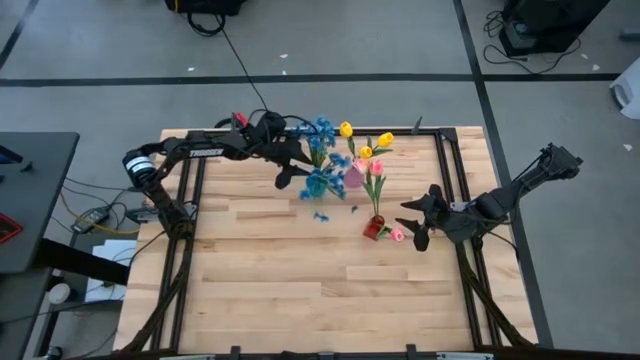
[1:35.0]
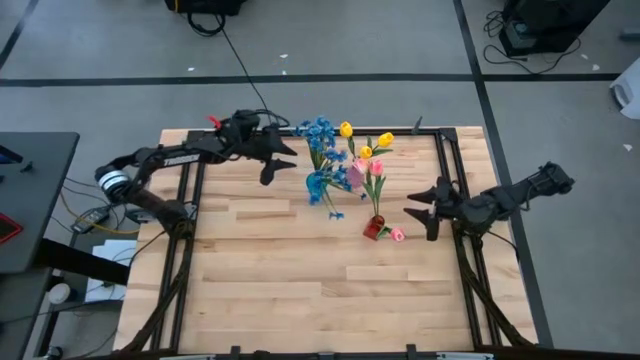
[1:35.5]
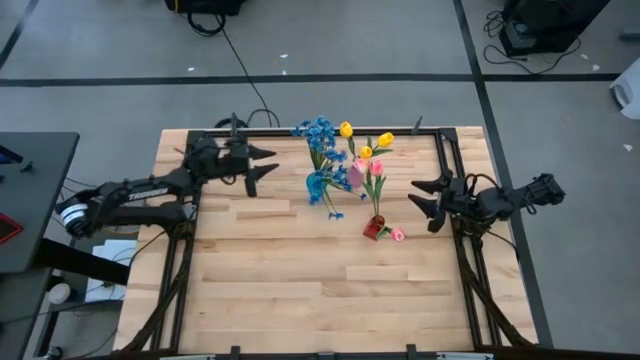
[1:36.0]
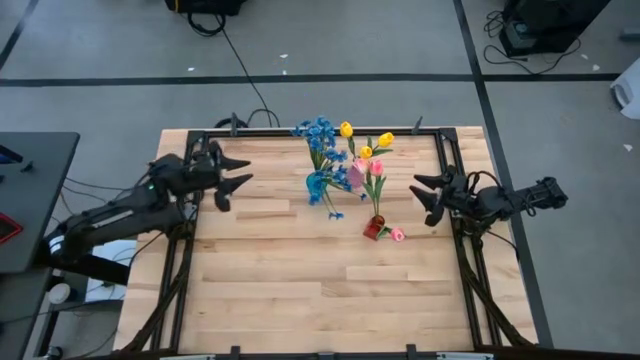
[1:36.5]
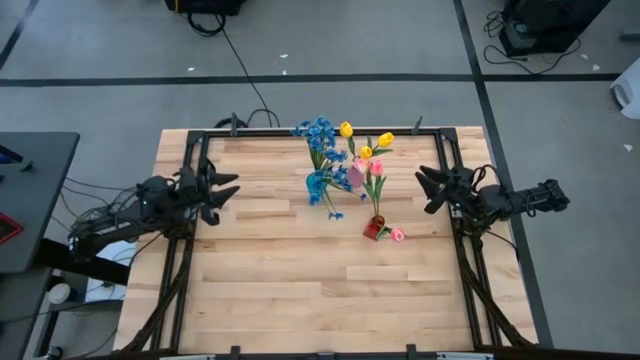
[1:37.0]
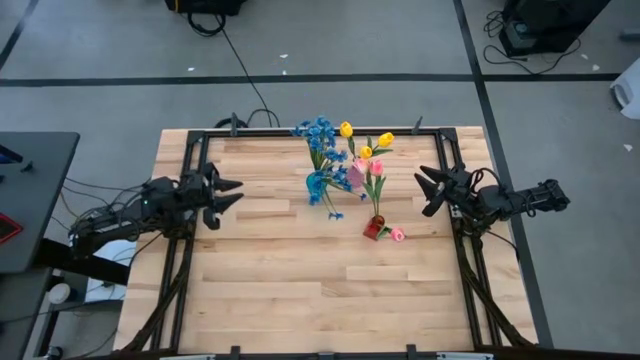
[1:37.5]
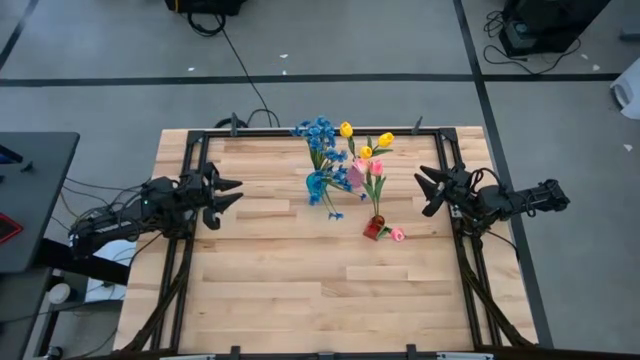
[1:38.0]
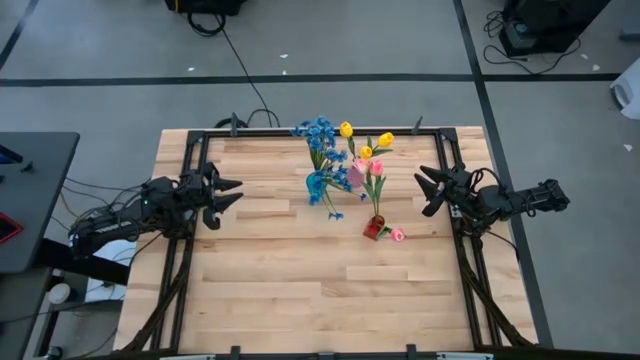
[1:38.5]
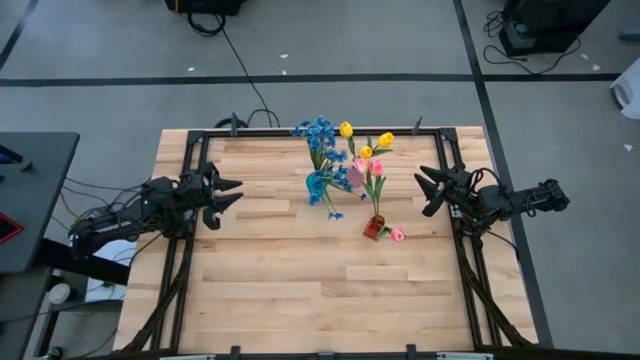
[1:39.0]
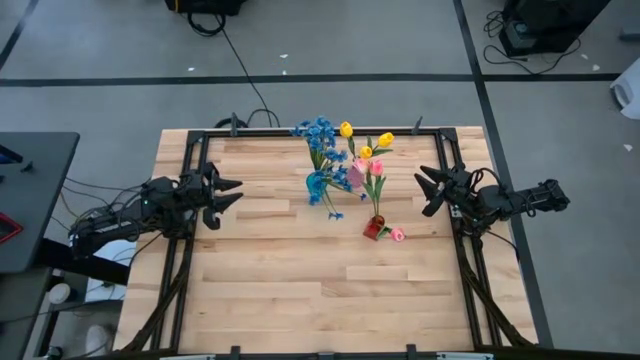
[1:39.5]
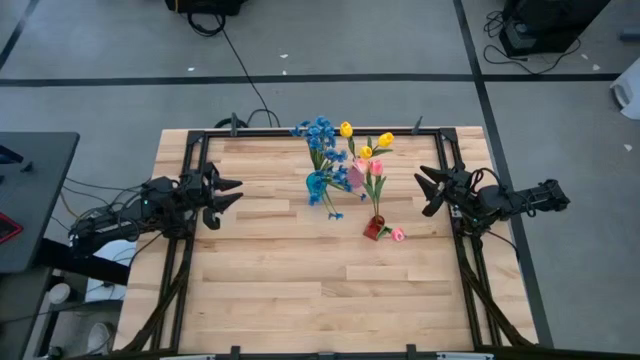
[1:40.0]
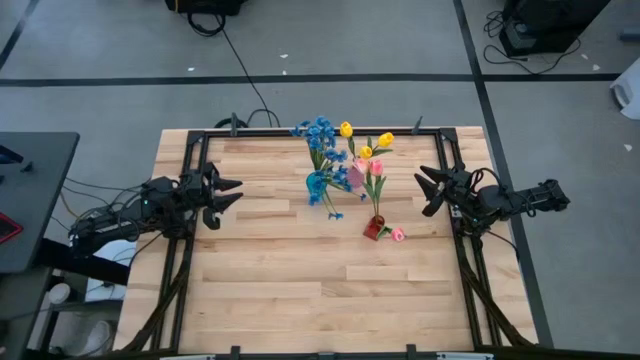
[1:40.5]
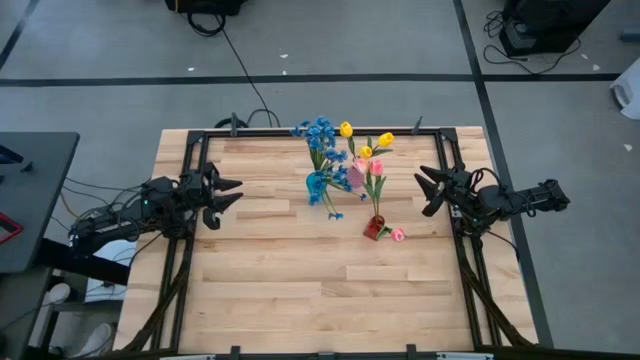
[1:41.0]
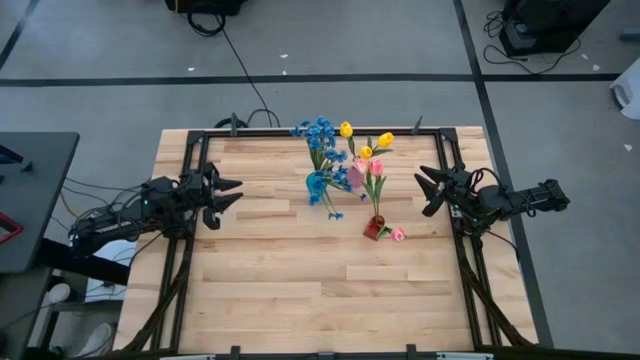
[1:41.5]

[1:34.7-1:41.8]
Task: Sort flowers into vase by color
Return to Home Position

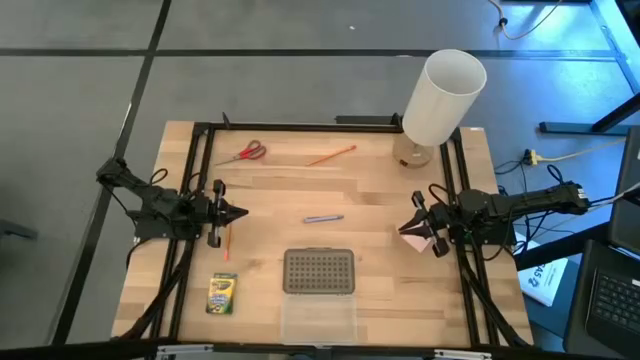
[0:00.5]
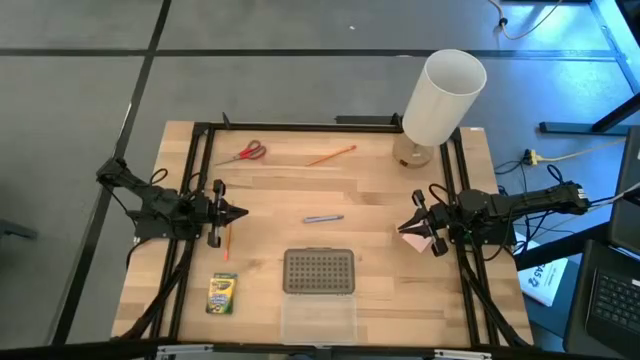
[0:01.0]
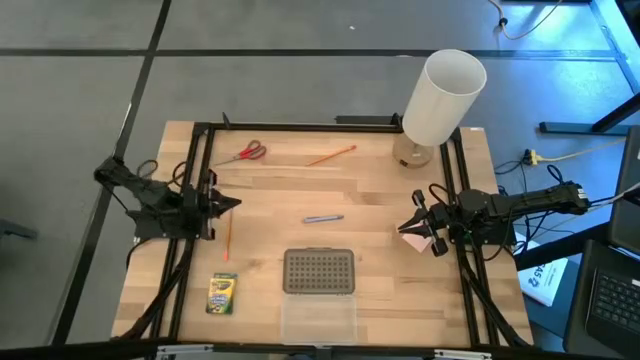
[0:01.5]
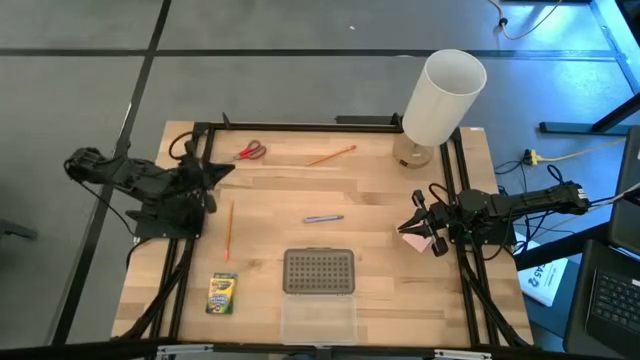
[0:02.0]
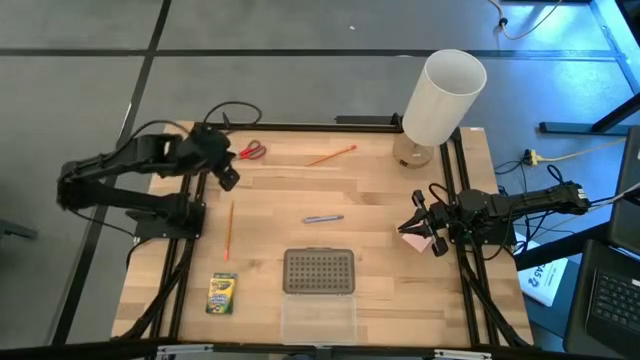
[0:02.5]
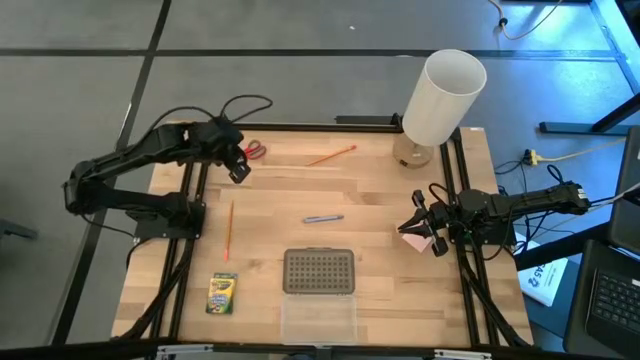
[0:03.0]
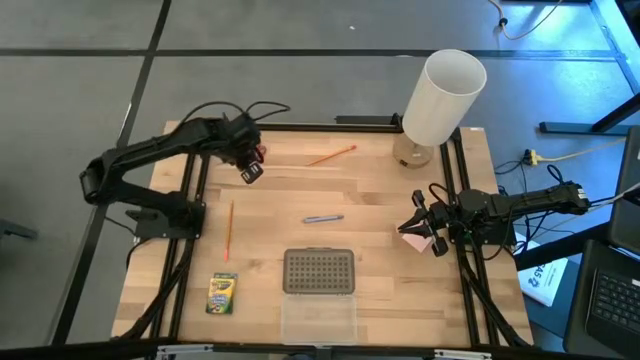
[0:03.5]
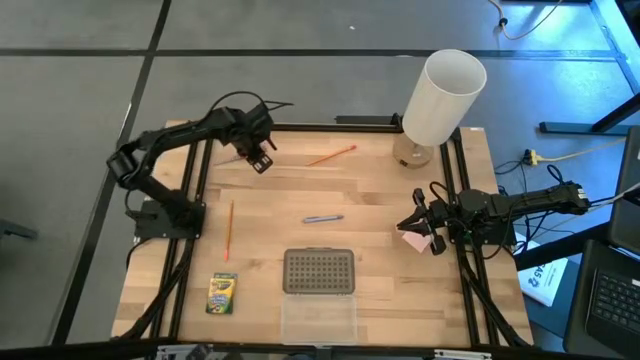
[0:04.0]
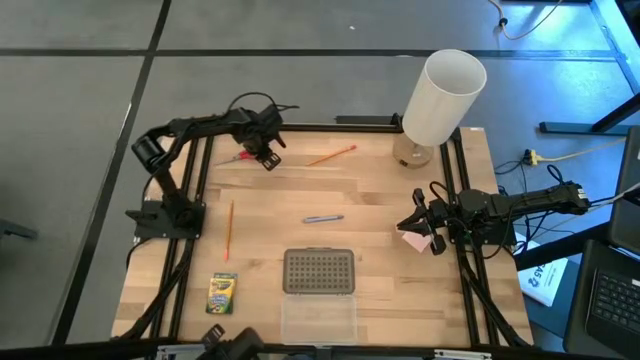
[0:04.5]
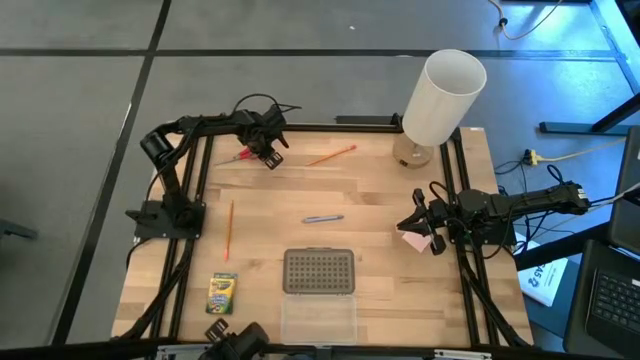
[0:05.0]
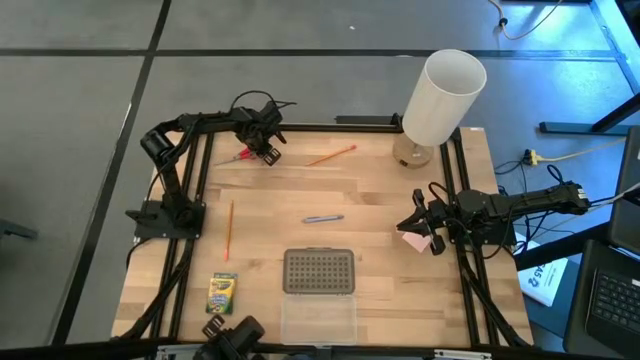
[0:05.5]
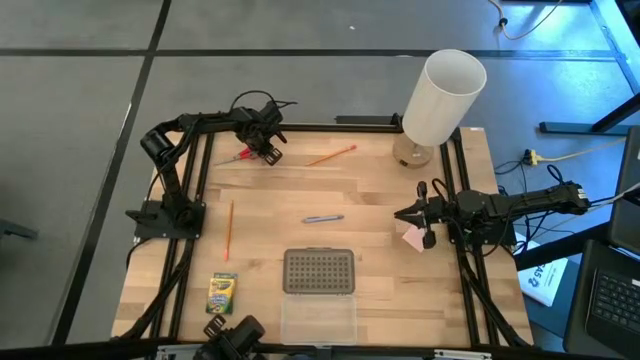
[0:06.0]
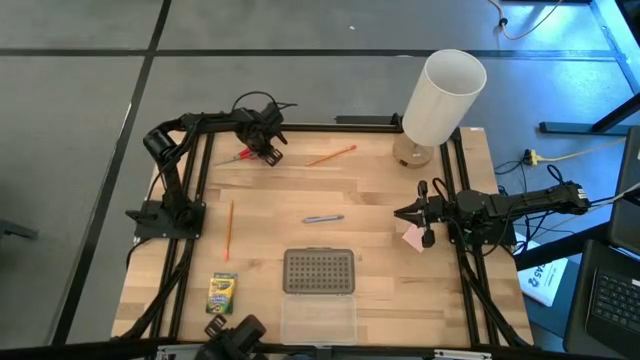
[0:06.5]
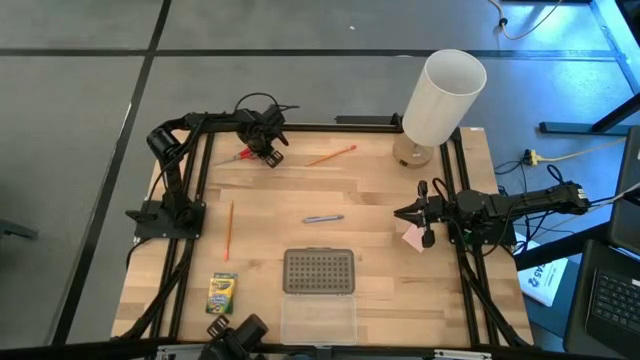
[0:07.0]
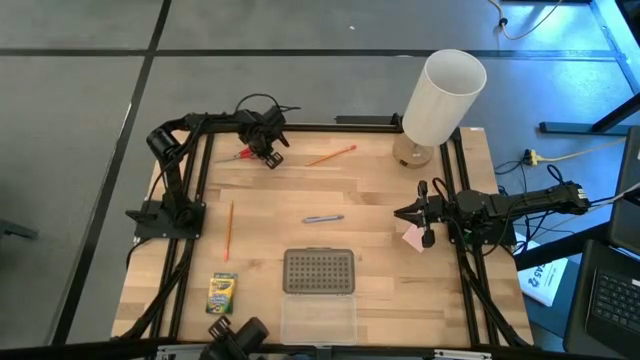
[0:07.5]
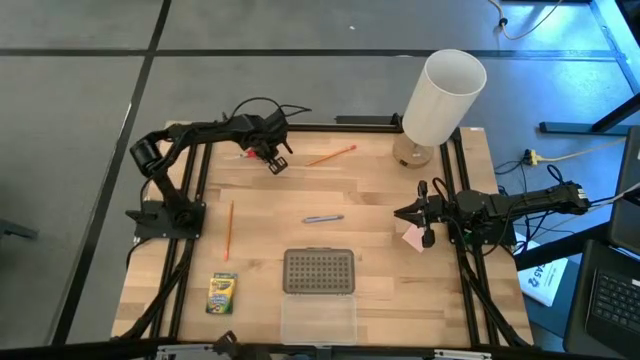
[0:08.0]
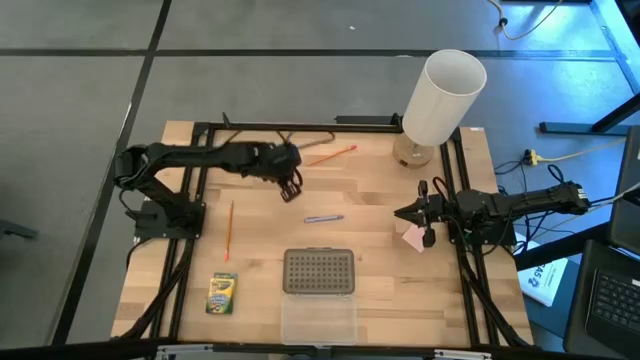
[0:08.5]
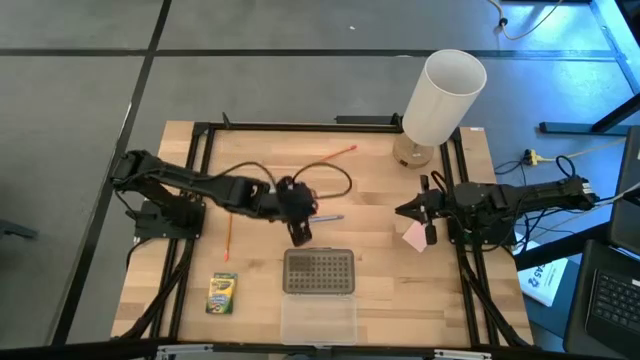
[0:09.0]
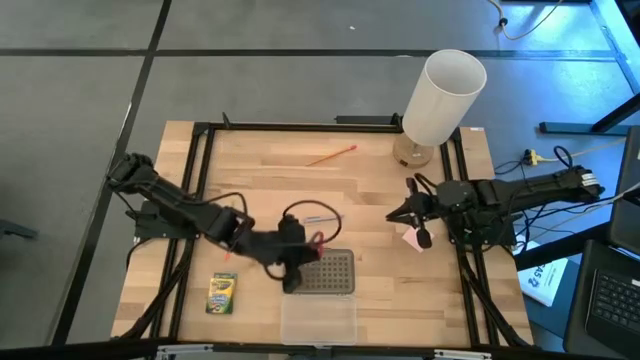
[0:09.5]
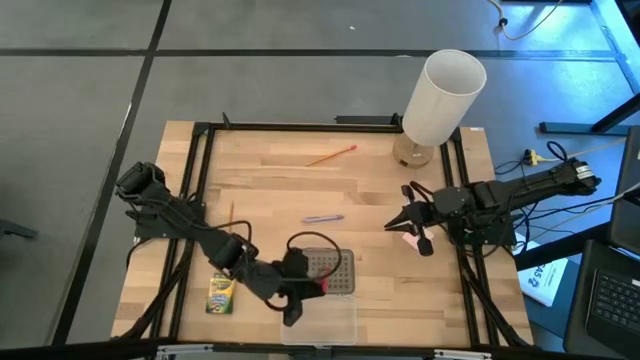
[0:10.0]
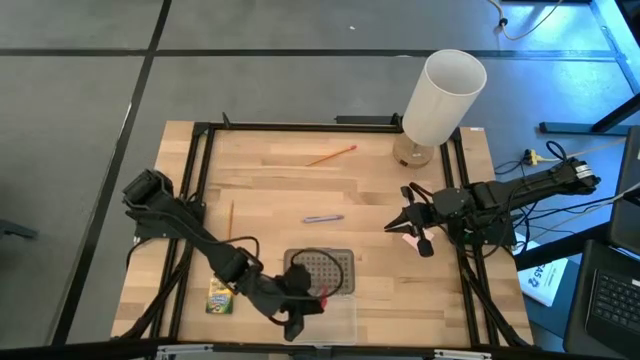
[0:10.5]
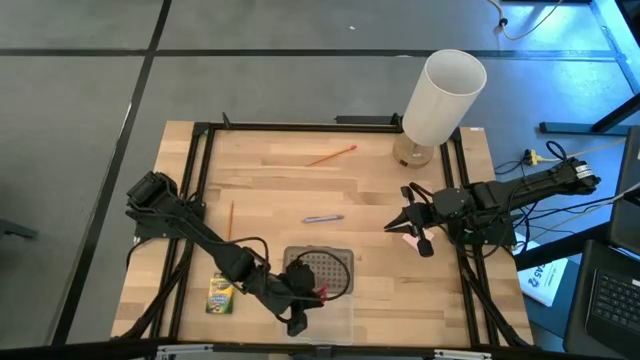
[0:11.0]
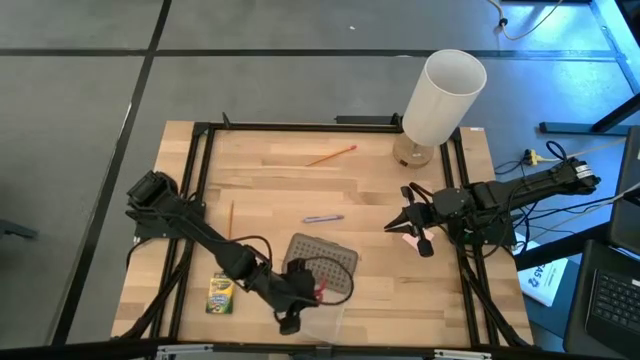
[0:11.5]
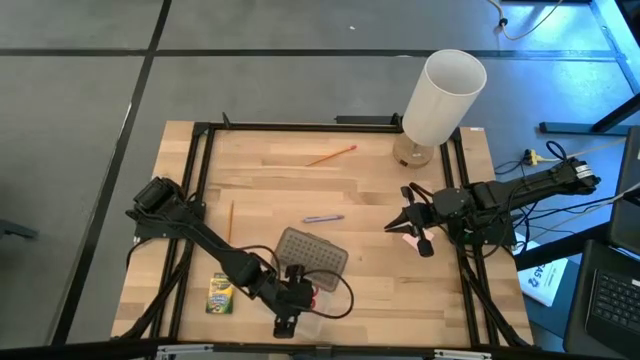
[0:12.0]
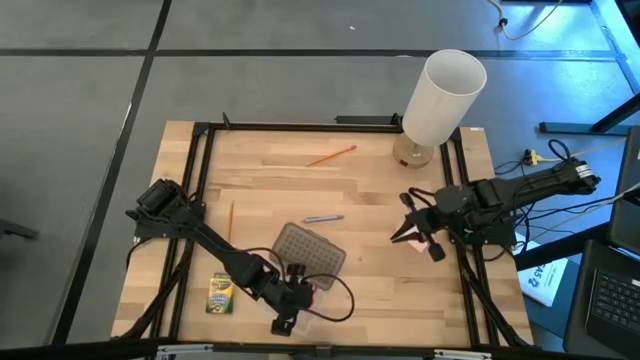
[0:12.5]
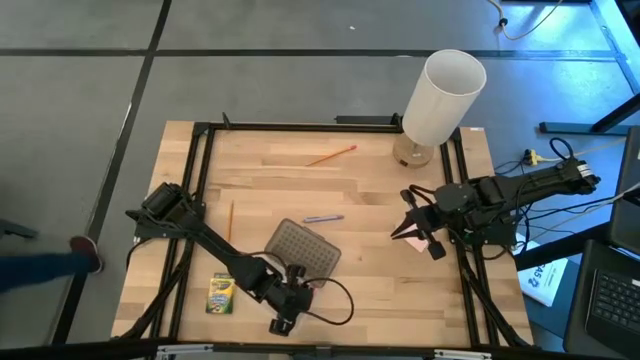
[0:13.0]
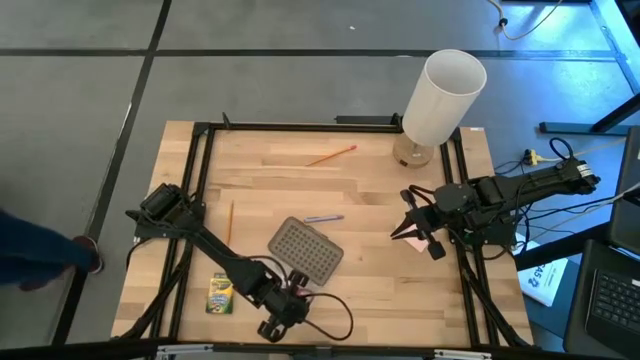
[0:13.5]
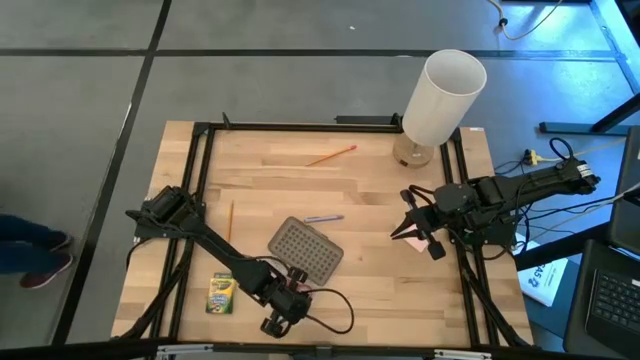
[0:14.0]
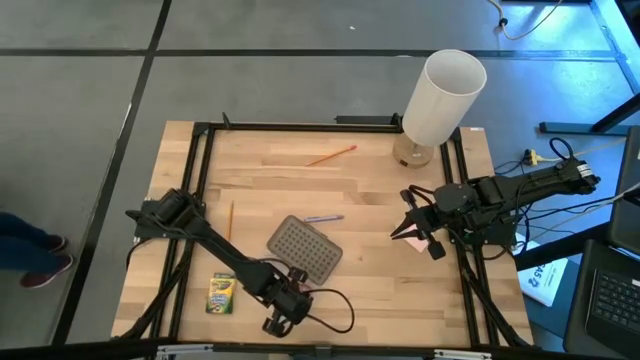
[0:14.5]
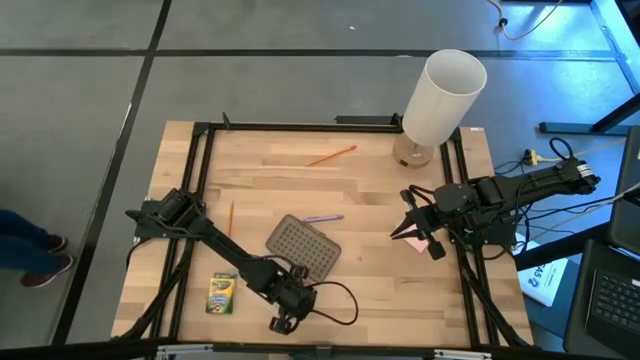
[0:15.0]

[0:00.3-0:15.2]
Task: Pack school essentials
Put the red scissors into the black supply box
